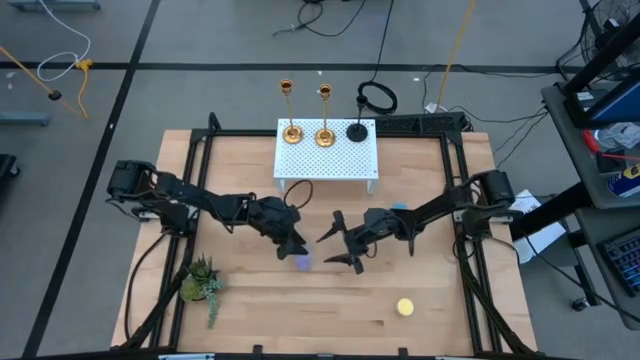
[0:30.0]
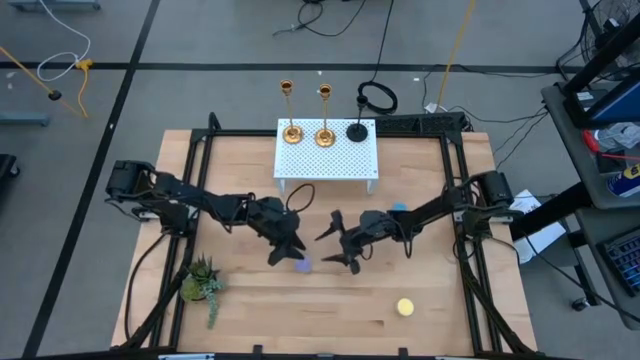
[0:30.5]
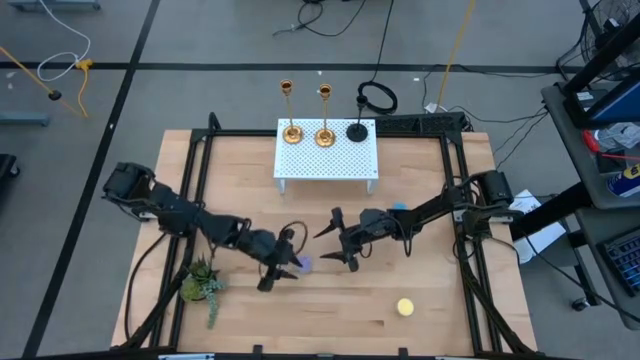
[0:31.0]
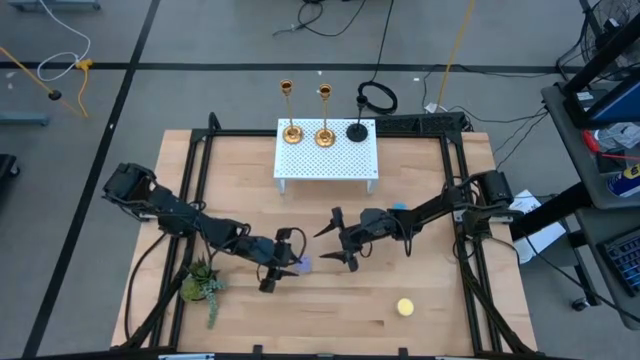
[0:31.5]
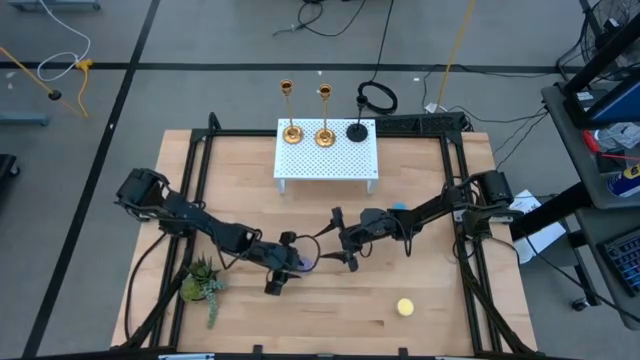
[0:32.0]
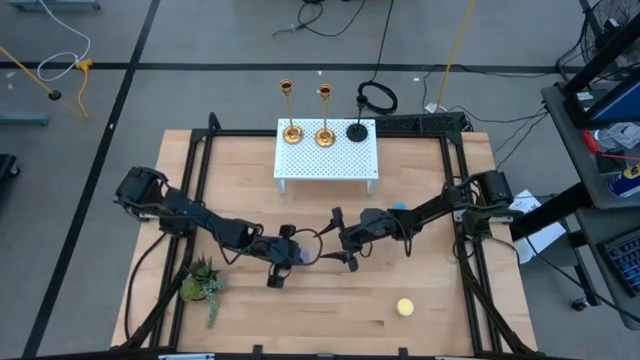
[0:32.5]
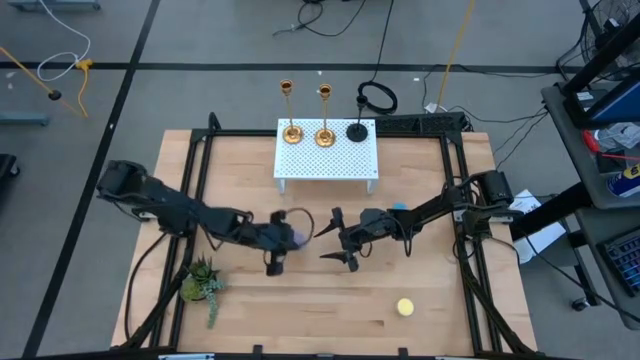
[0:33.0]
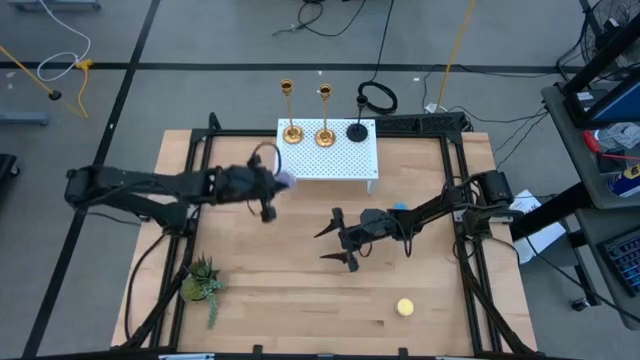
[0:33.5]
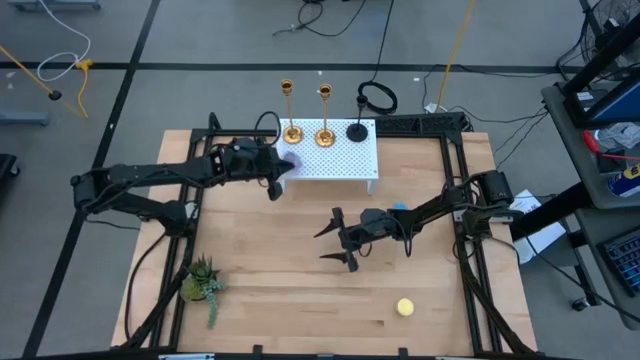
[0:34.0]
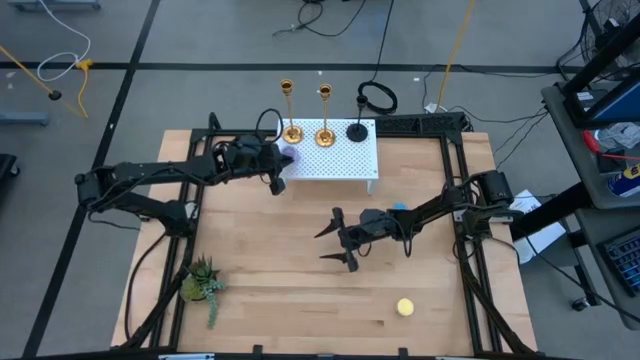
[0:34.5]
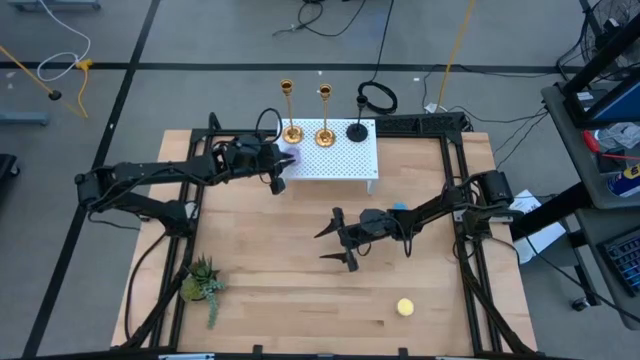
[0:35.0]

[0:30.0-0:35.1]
Task: Pick & Place candle stick holders
Put the purple scented candle on the shelf

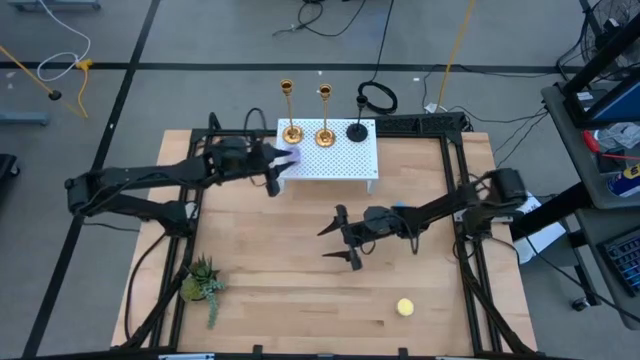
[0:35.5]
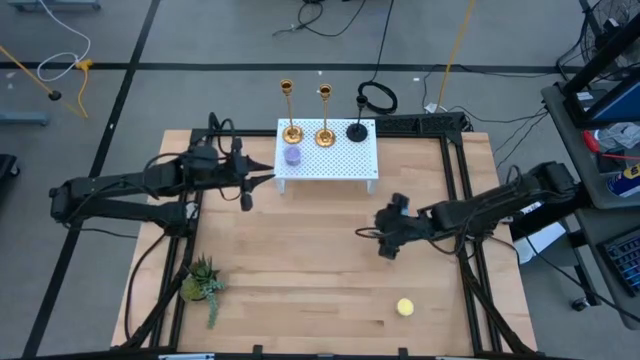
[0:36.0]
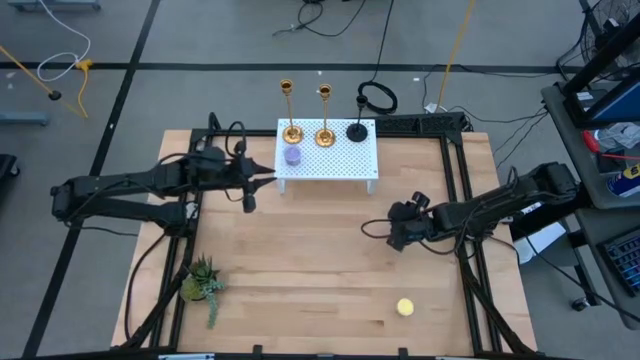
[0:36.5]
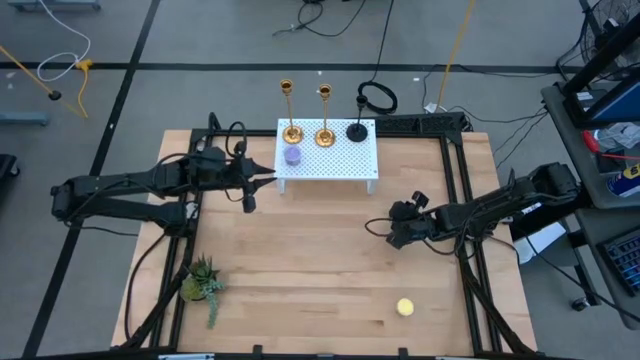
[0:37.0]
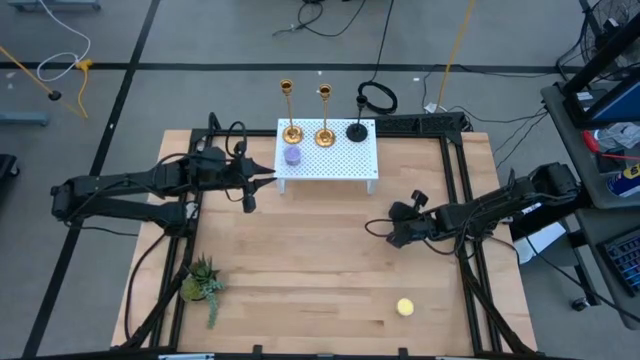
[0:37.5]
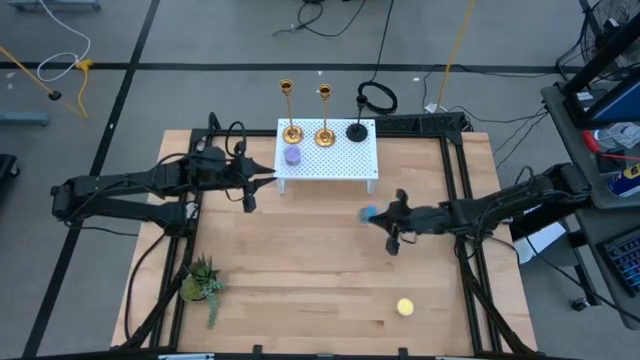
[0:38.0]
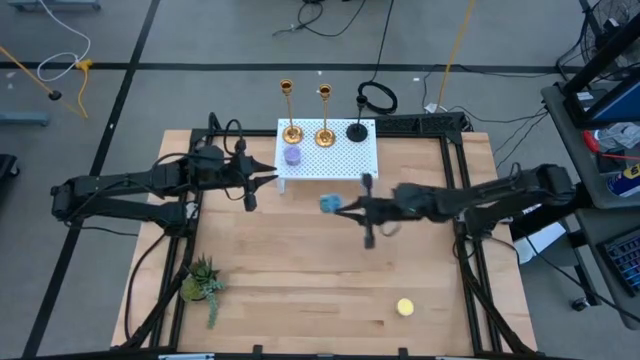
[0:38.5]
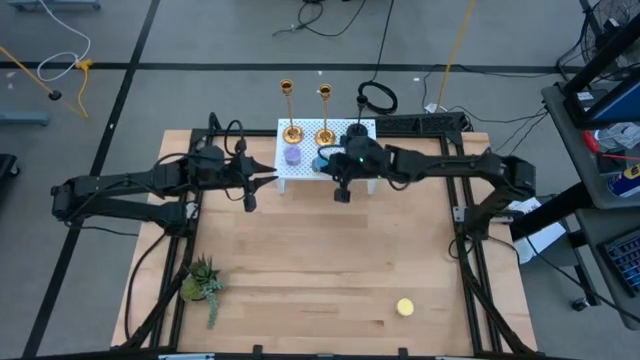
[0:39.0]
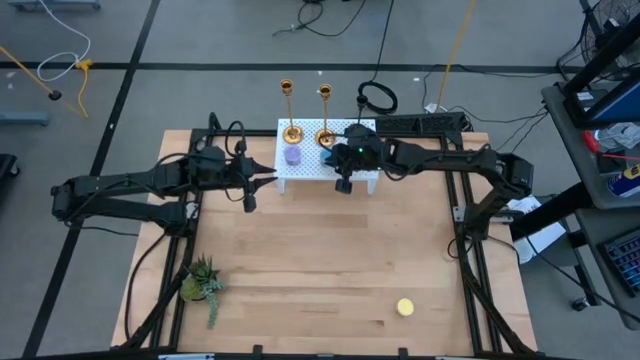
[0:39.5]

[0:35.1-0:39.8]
Put the blue scented candle on the shelf

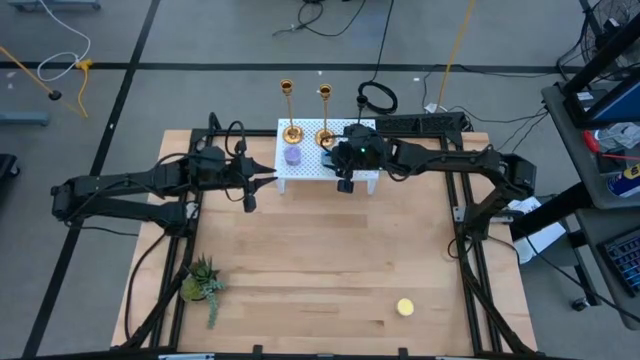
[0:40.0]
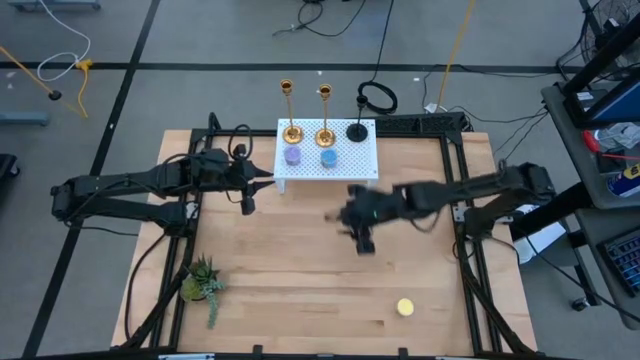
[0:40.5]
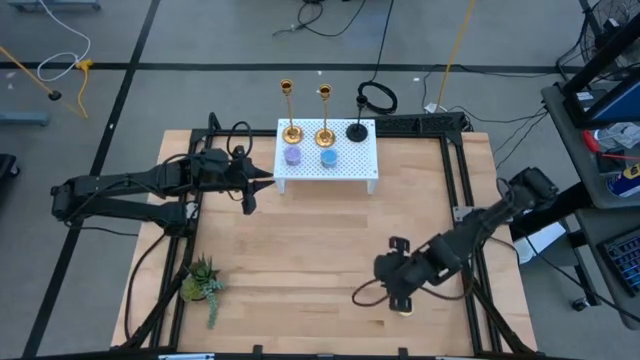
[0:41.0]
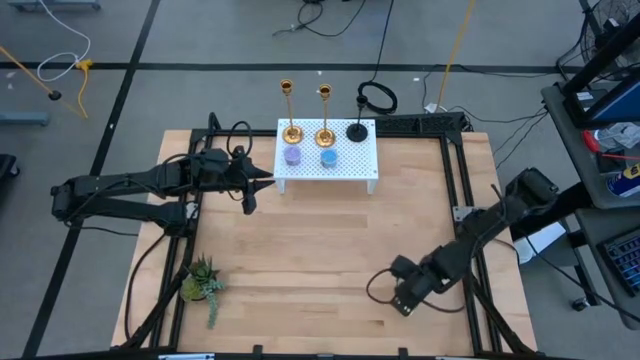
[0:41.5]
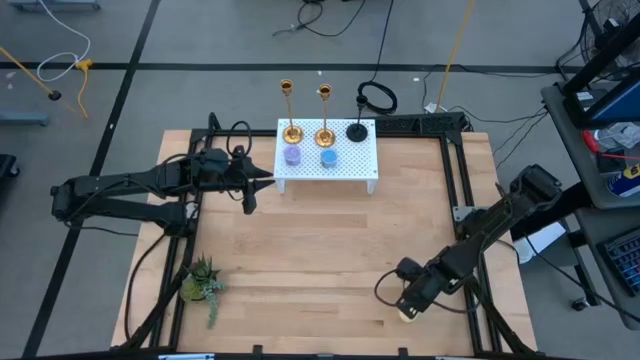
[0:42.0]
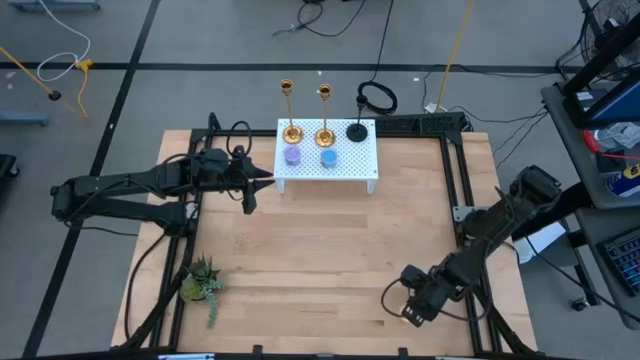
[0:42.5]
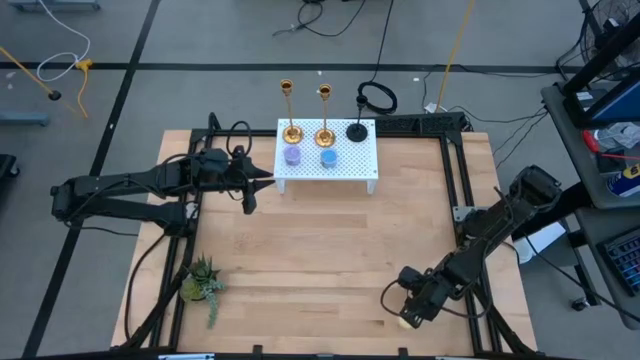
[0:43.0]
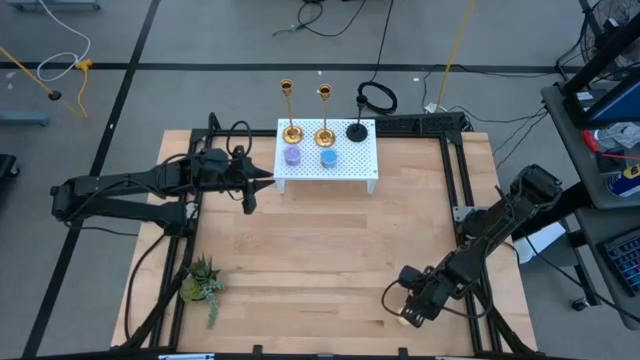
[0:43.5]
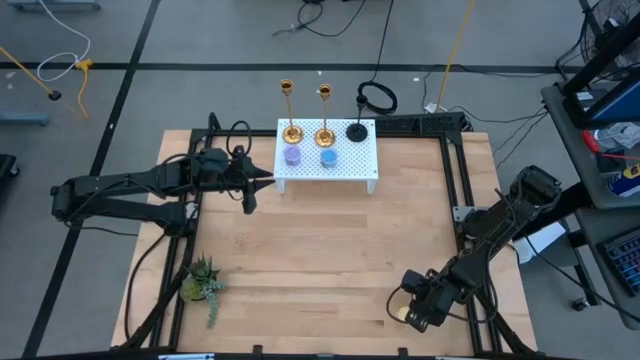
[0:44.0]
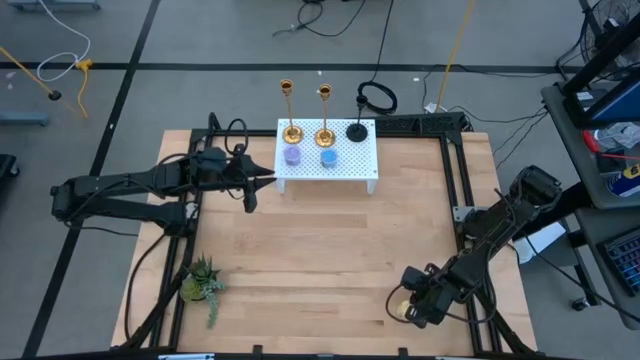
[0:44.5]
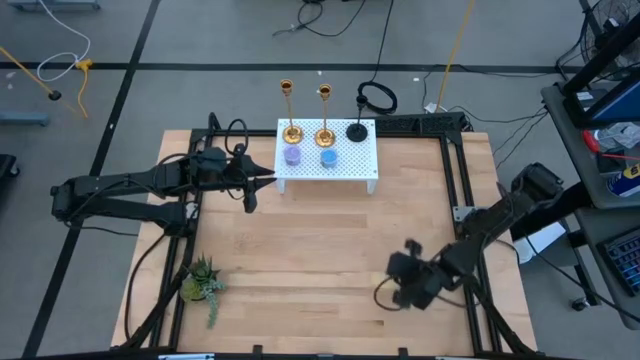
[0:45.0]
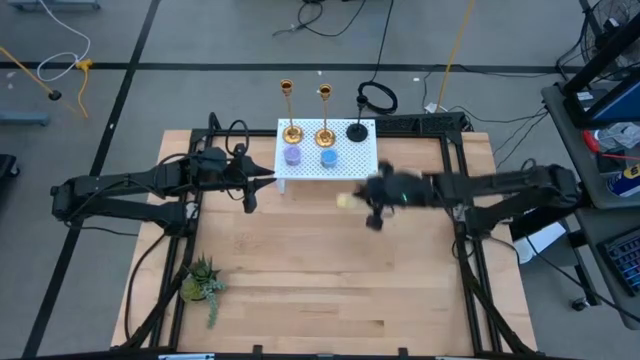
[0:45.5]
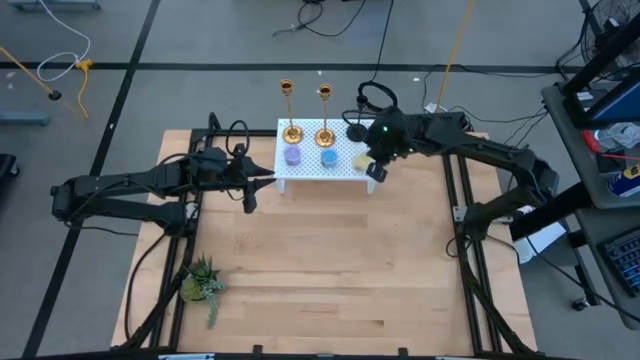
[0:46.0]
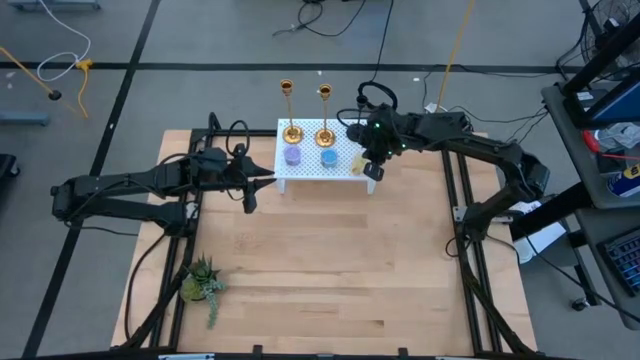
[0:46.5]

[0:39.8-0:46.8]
Put the yellow scented candle on the shelf

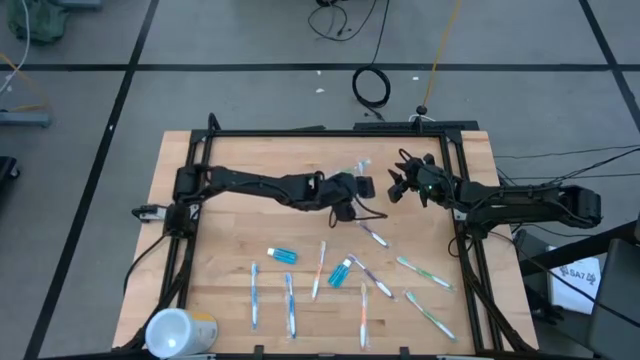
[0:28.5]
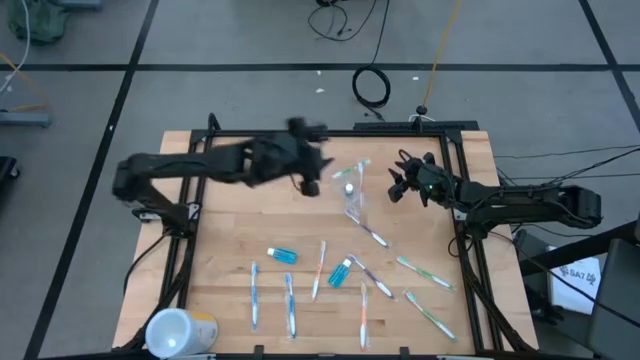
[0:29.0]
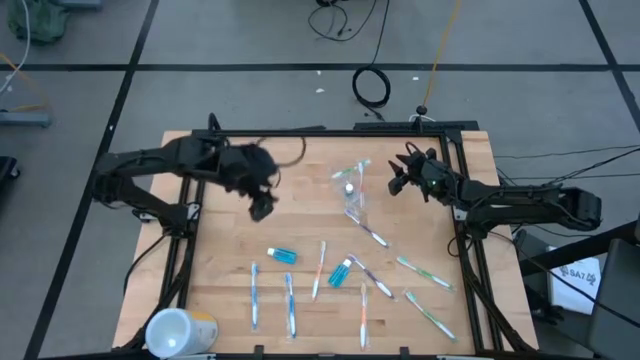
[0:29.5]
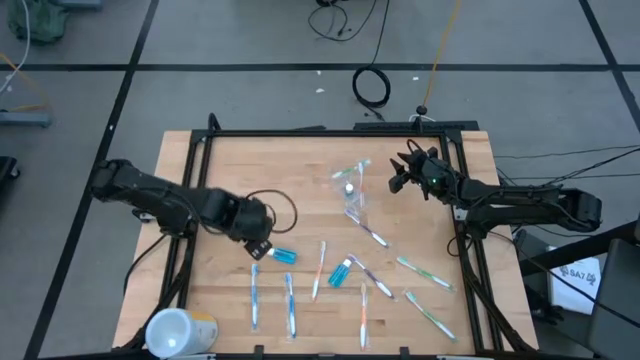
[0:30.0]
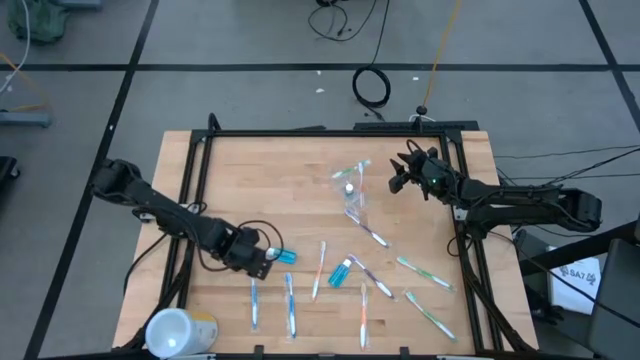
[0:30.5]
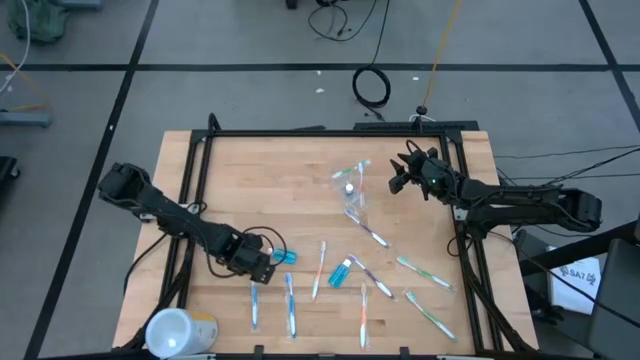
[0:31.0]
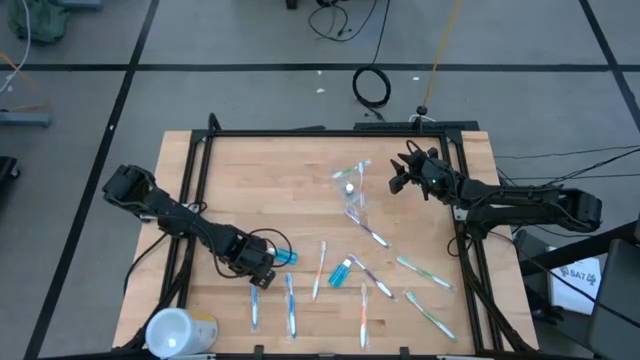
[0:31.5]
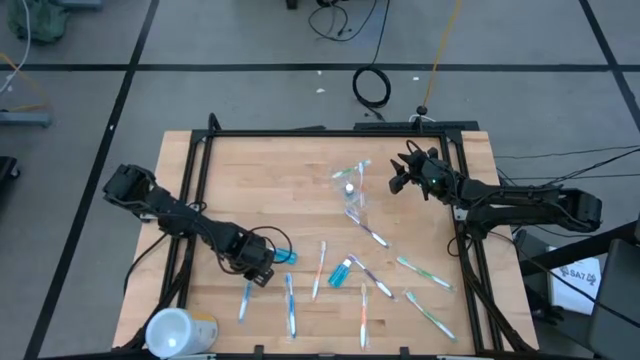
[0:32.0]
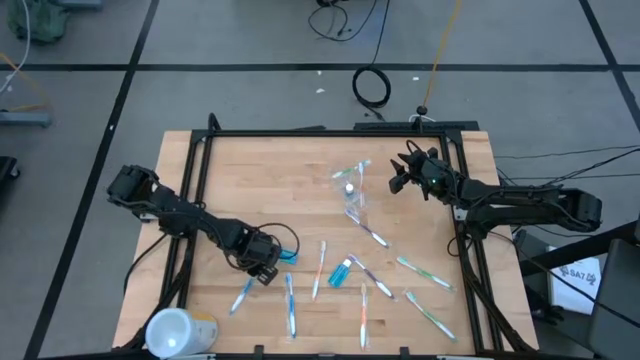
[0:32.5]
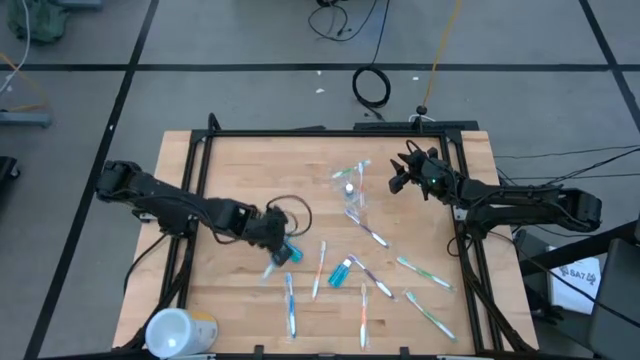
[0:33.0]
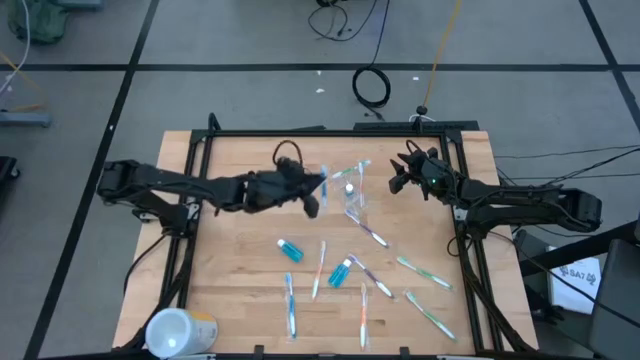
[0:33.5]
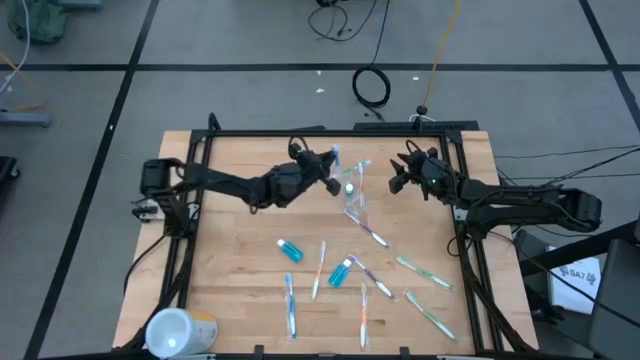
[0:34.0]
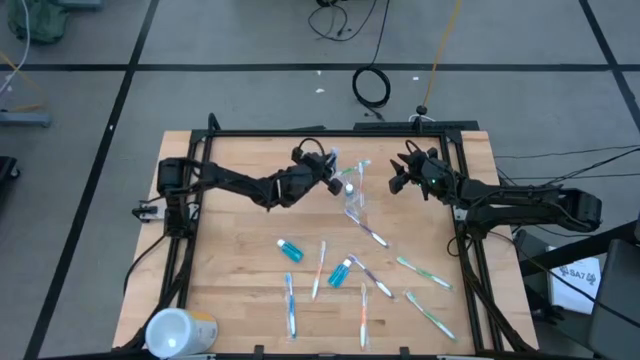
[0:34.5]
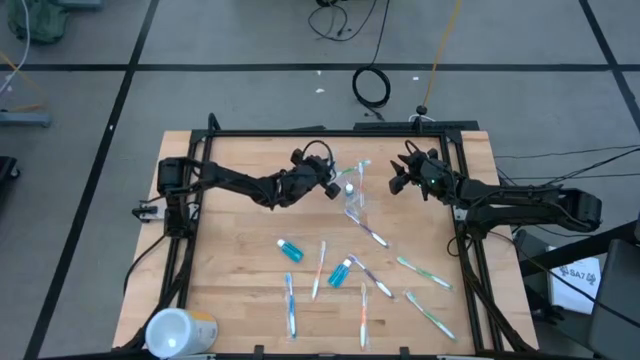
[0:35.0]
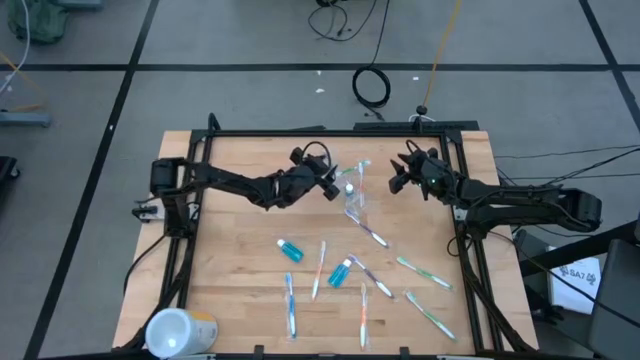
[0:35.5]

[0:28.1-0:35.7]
Task: Pick & Place toothbrushing station
Put the left blue toothbrush into the transparent organizer
